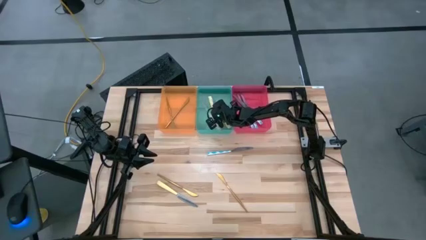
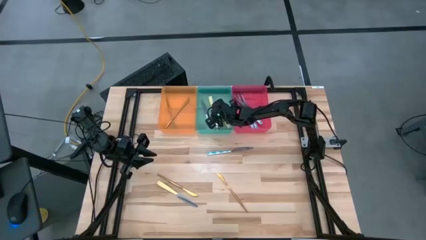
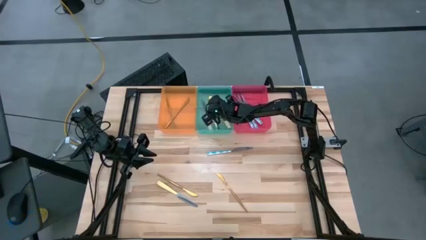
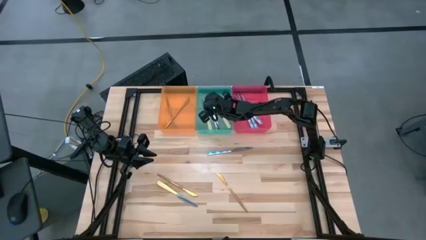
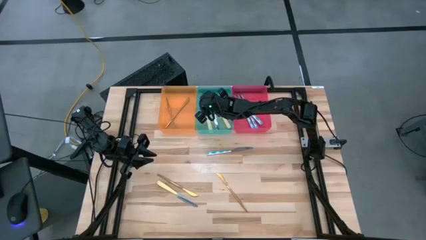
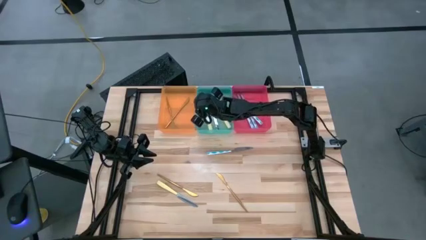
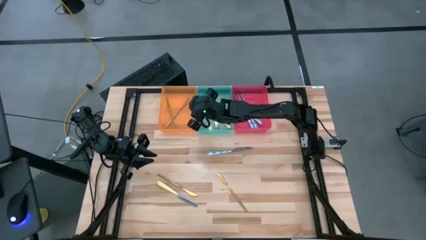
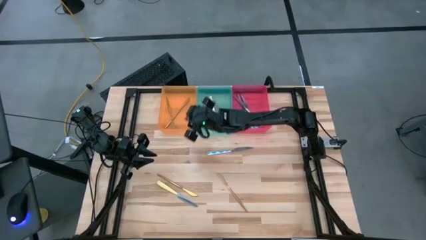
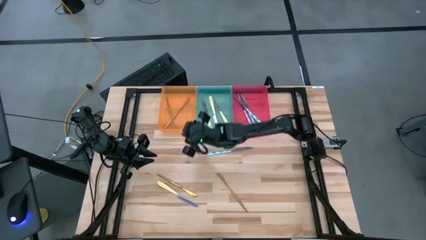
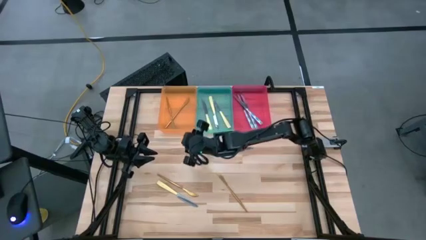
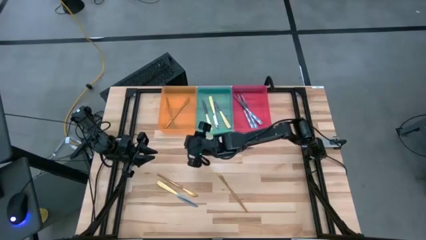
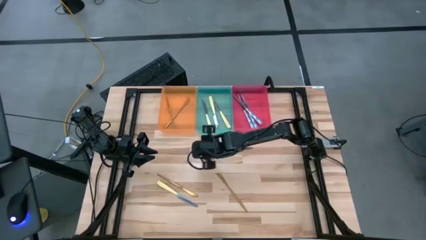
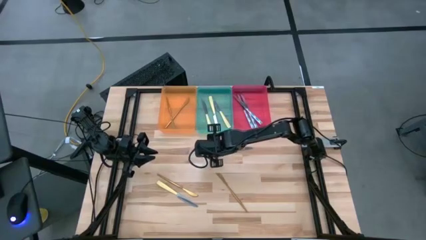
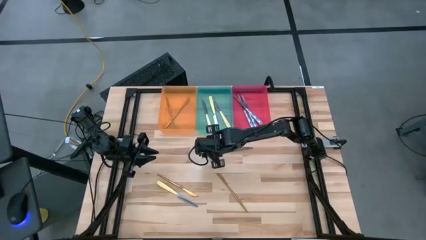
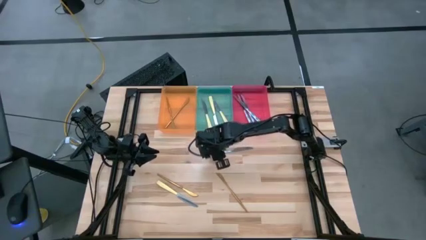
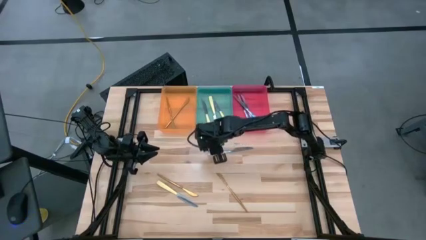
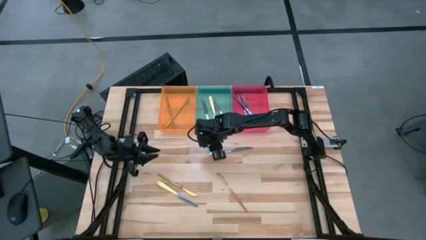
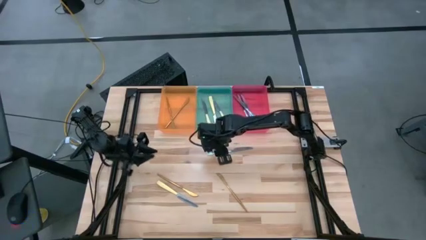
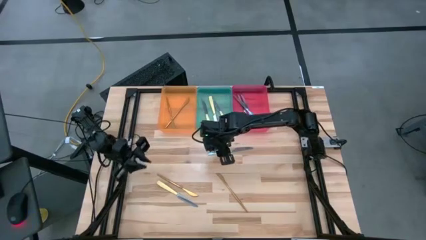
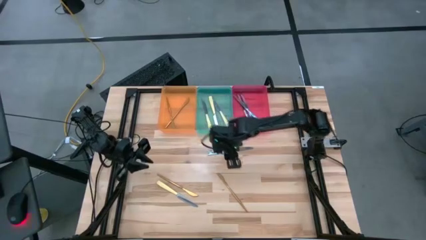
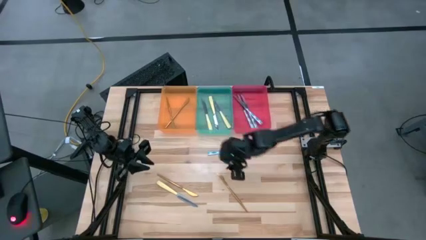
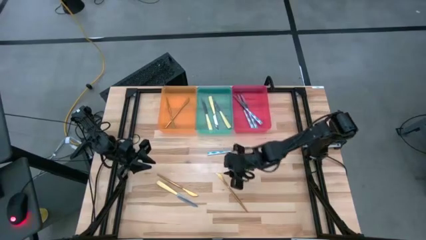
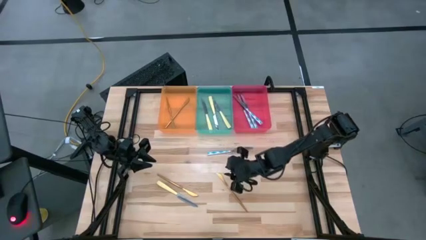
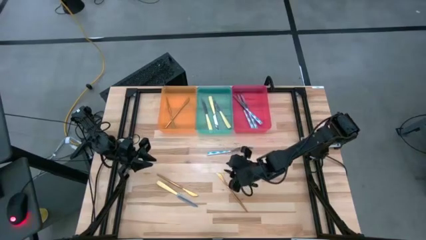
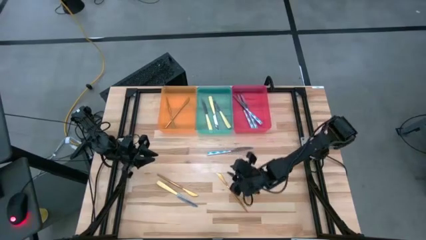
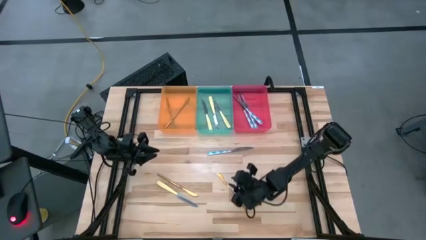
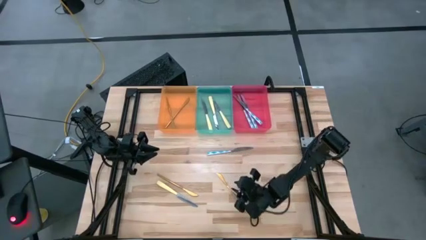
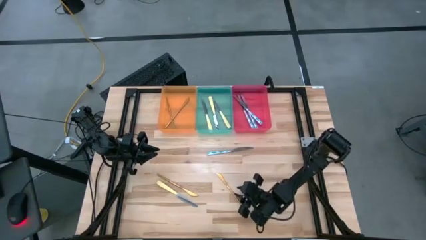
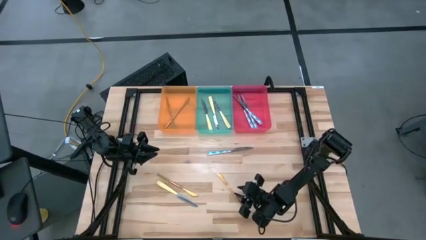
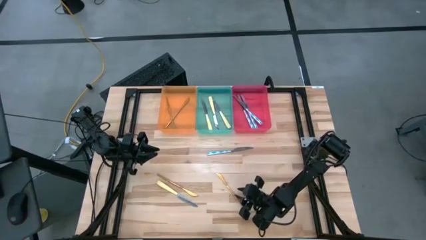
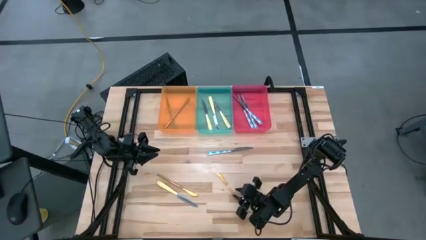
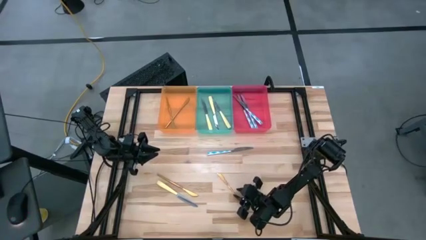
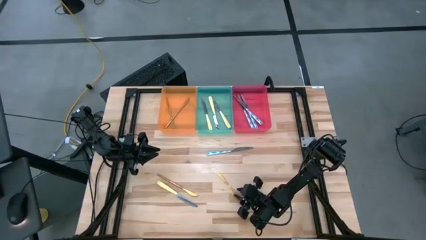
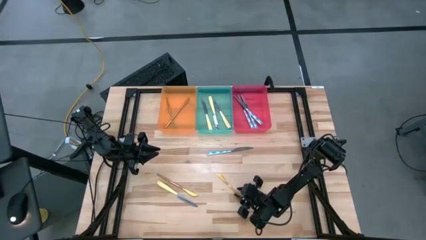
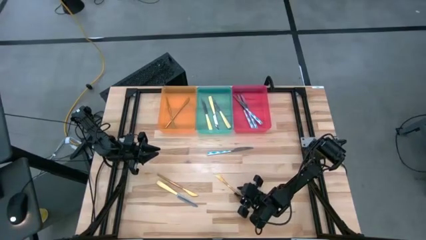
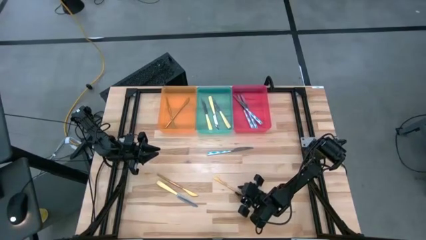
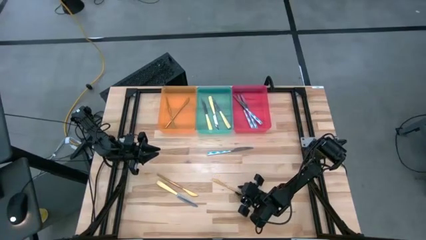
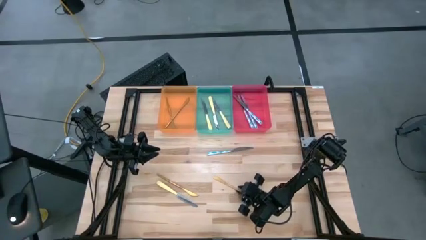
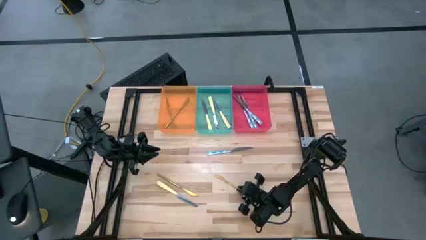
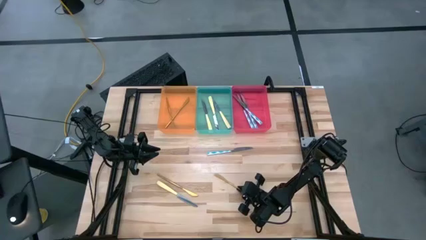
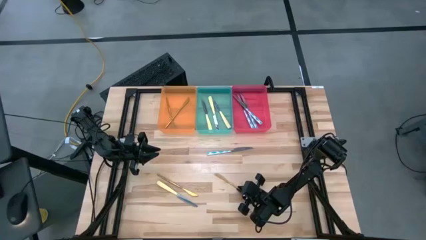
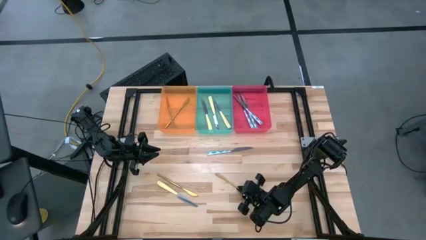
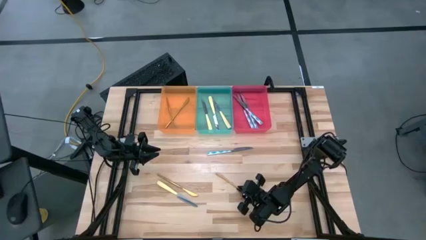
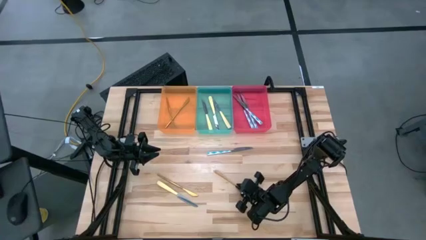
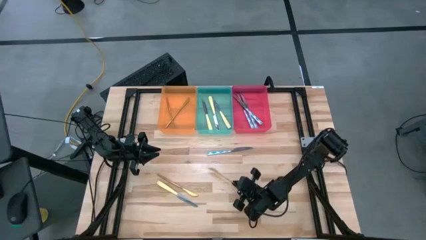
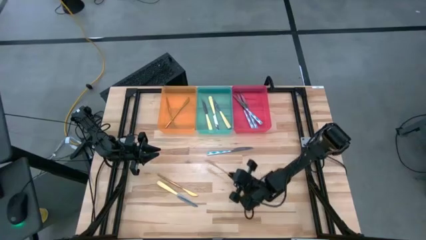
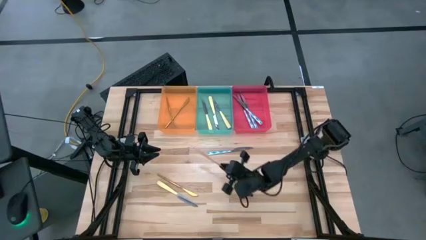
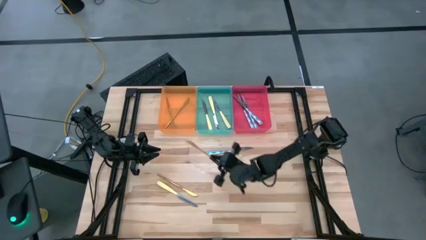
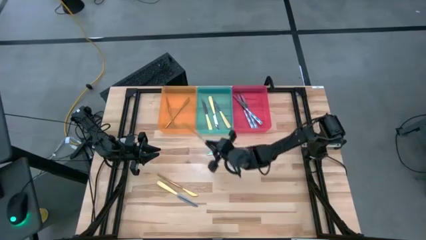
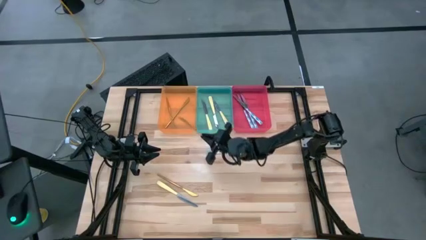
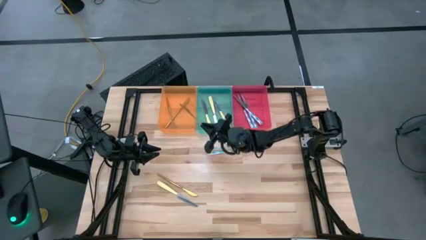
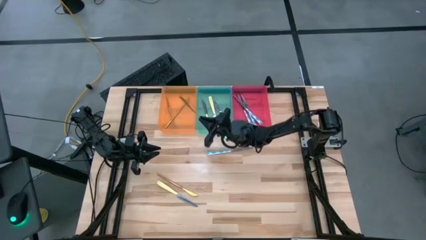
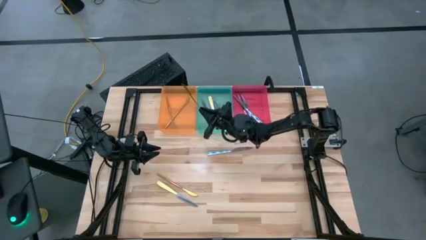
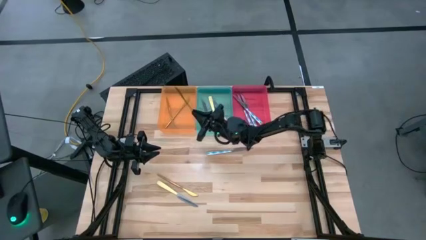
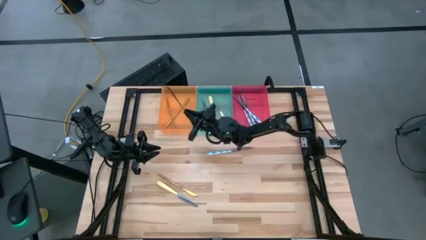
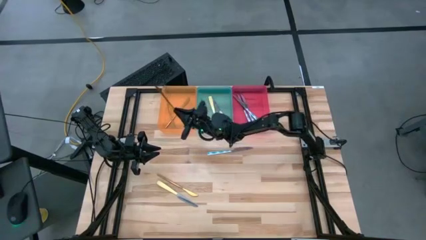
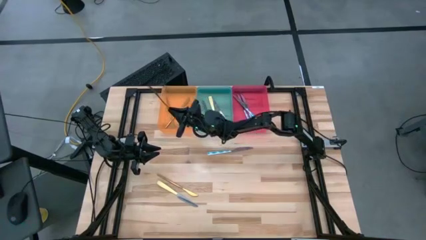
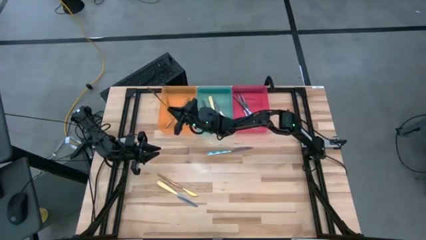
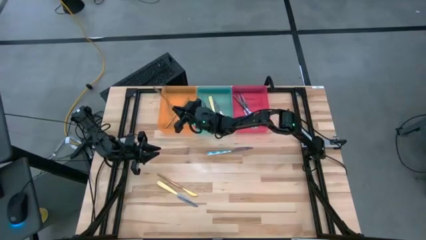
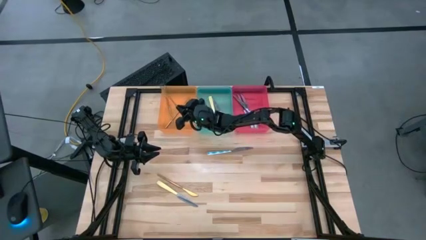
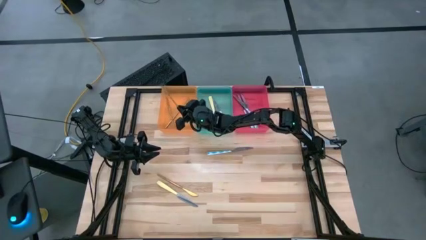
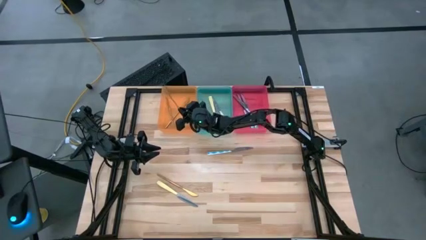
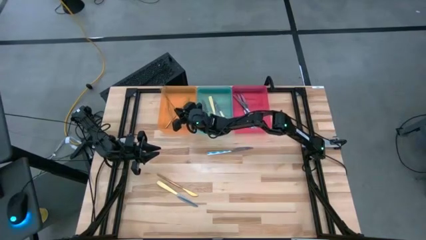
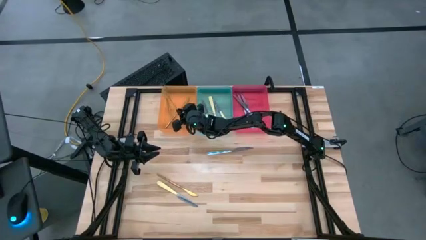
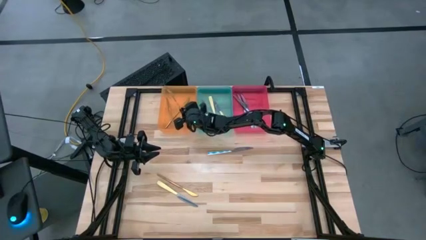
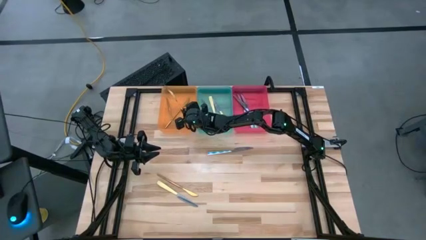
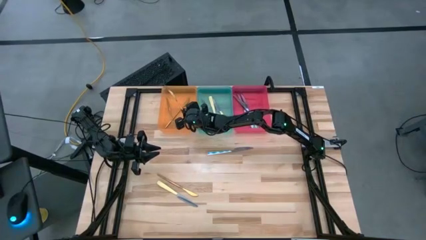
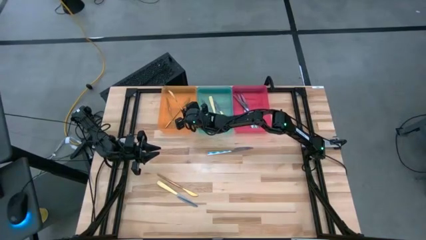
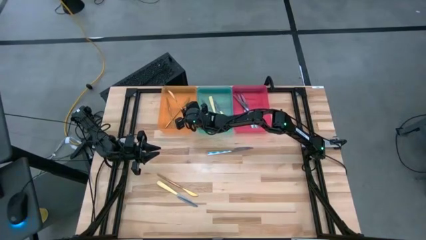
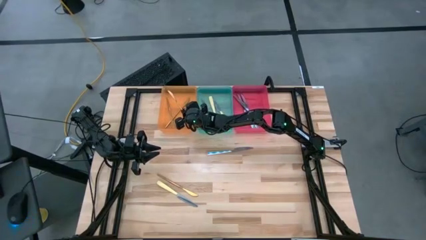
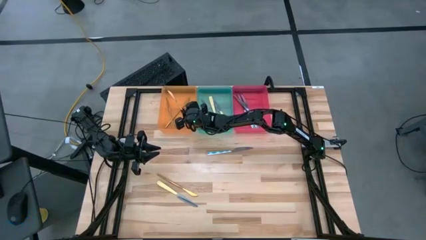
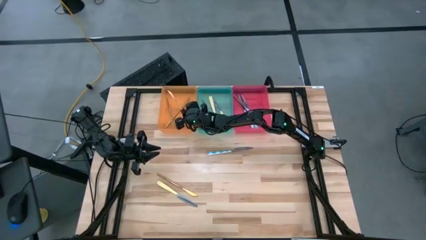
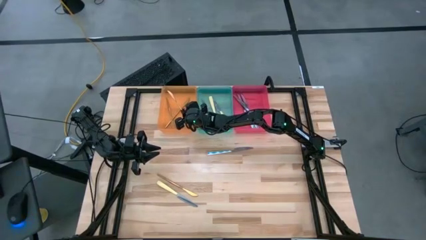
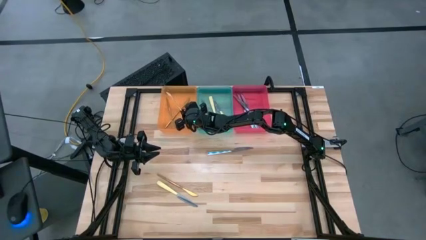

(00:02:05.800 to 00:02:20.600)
Task: Sort silverware by color (type)
Put the gold table knife into the orange bin

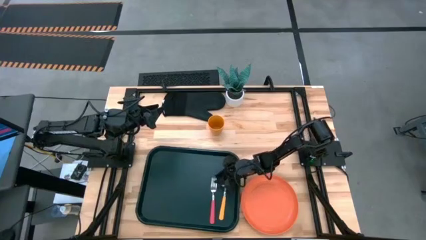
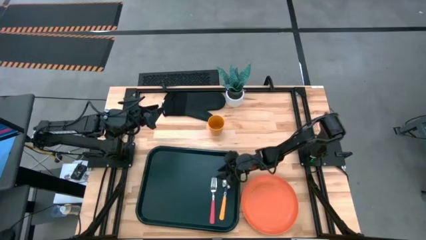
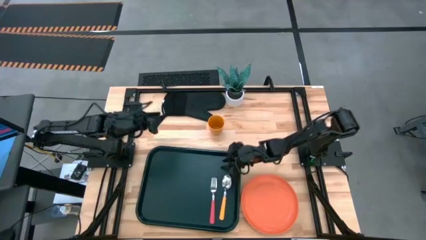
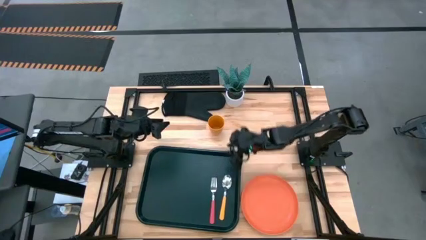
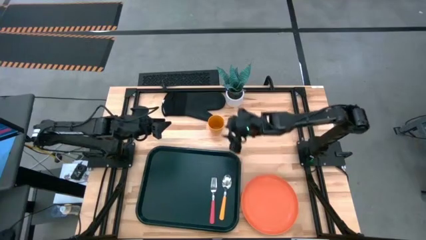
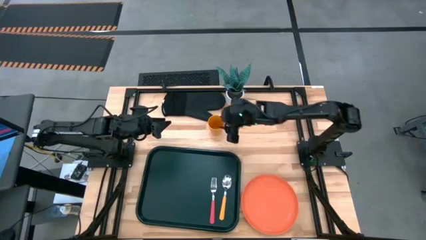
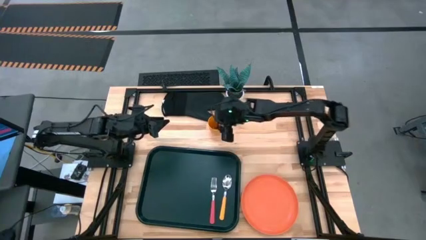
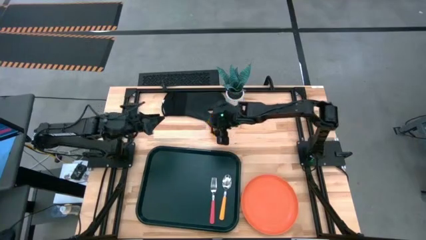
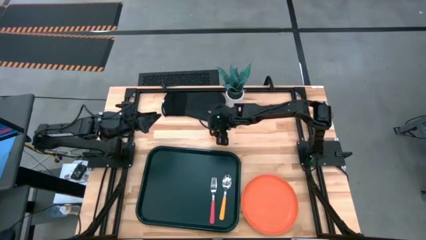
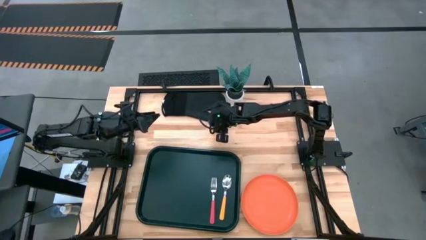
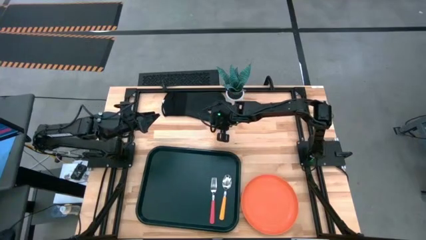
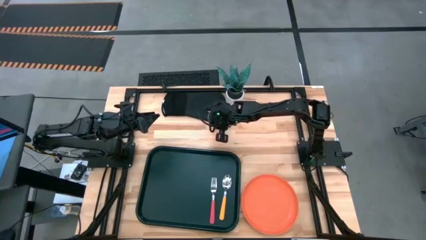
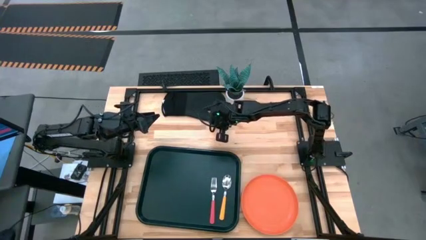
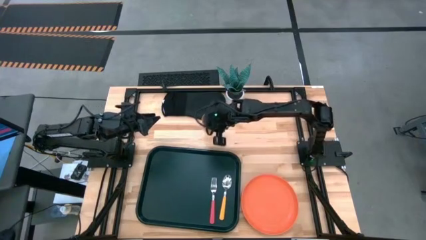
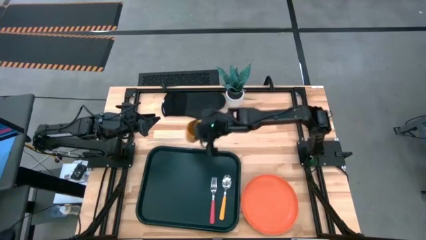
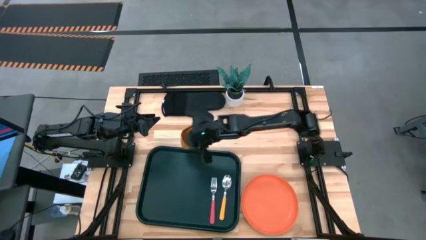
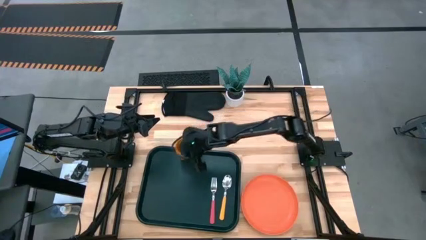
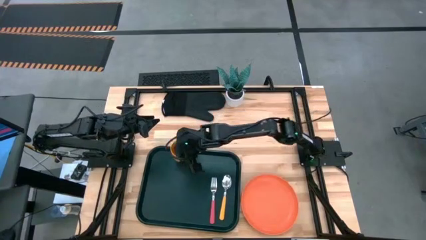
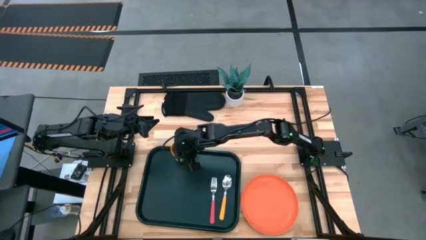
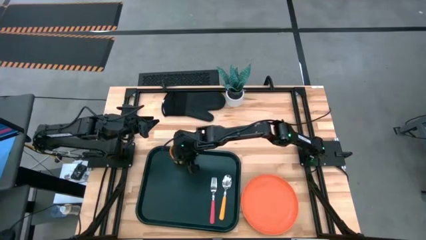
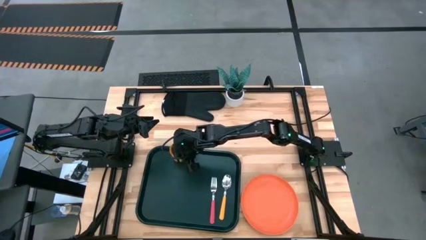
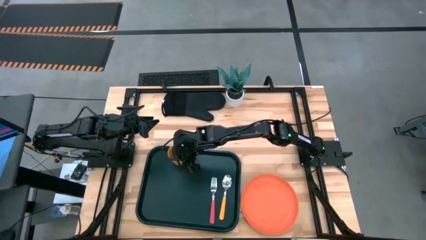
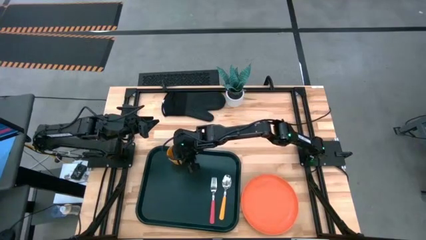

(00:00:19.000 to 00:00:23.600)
Task: Pick and place plate/cup/fork/spoon on tray
Put the orange cup on the top left of the serving tray
